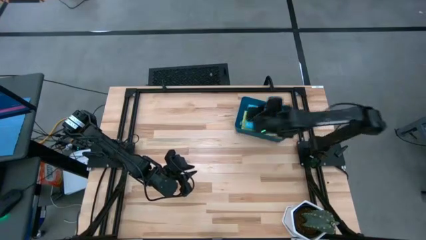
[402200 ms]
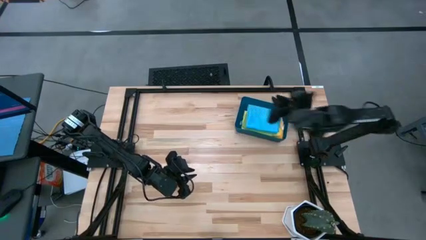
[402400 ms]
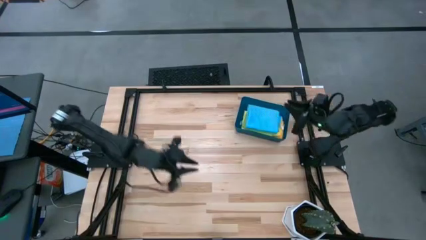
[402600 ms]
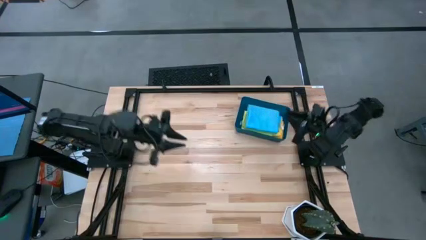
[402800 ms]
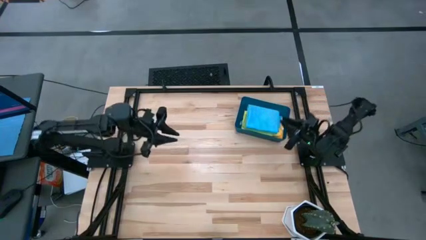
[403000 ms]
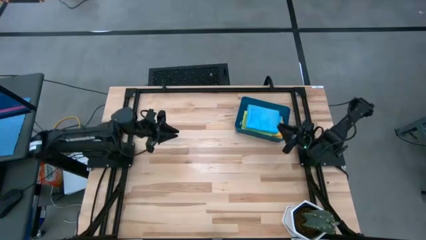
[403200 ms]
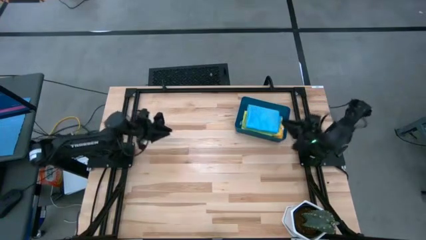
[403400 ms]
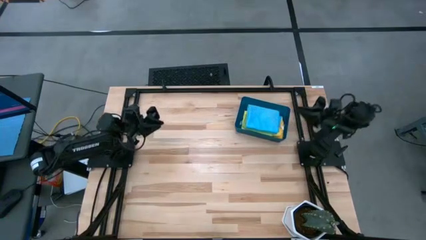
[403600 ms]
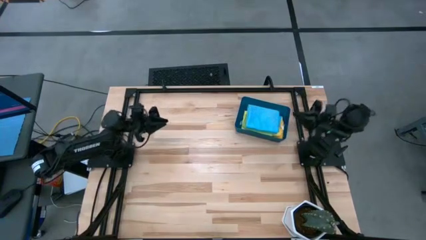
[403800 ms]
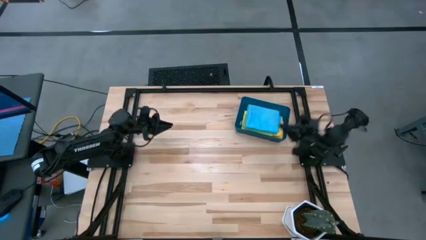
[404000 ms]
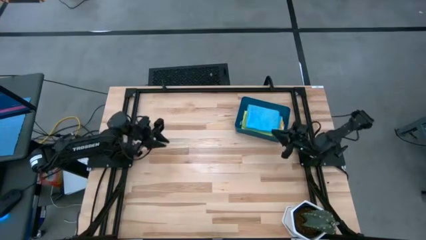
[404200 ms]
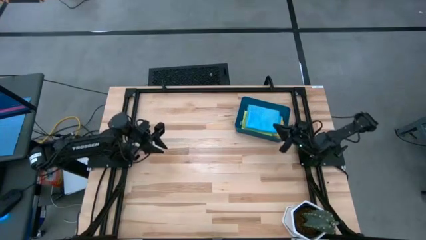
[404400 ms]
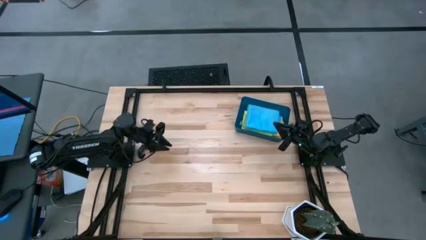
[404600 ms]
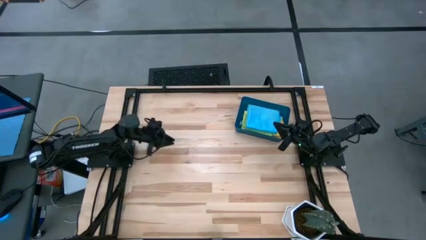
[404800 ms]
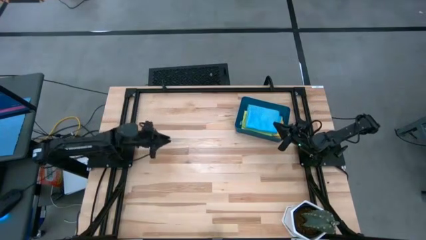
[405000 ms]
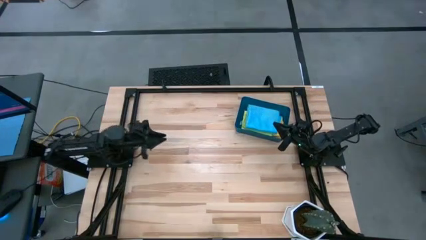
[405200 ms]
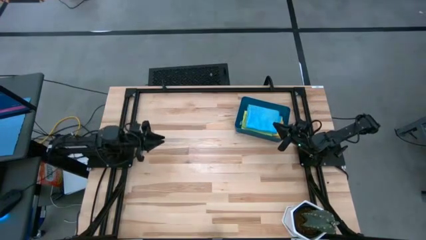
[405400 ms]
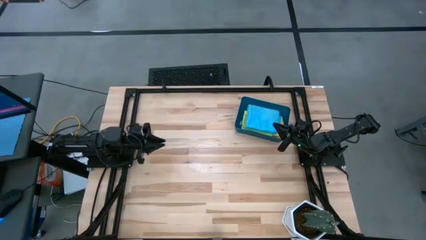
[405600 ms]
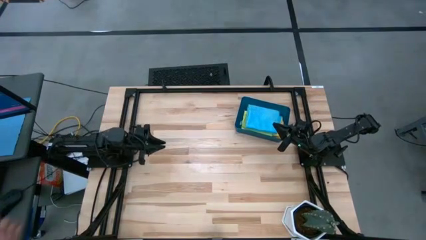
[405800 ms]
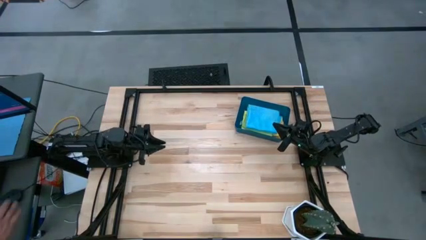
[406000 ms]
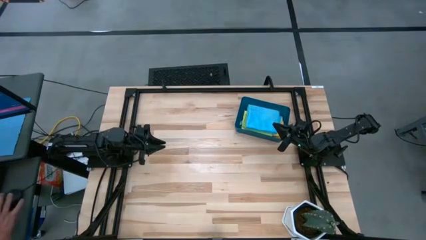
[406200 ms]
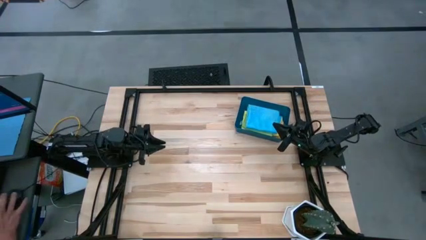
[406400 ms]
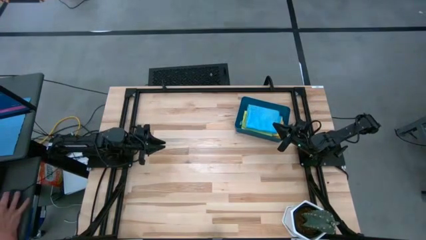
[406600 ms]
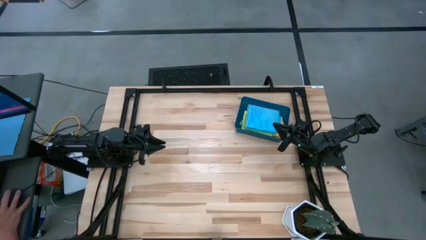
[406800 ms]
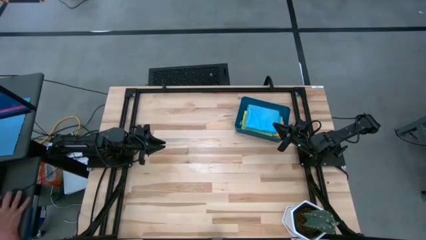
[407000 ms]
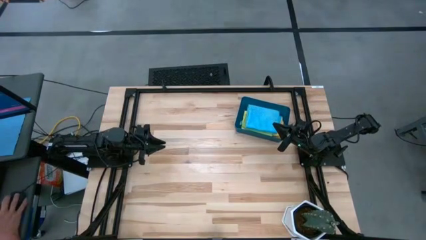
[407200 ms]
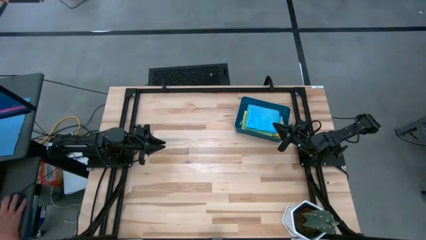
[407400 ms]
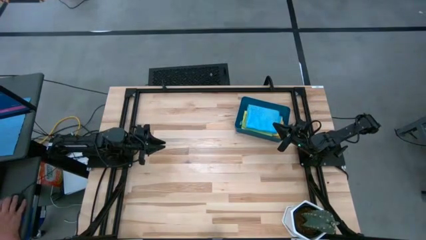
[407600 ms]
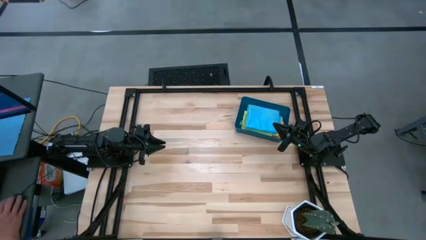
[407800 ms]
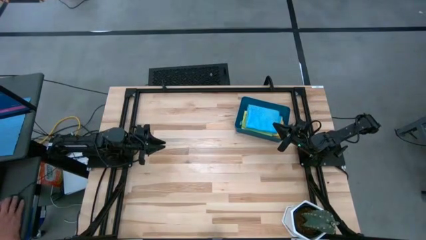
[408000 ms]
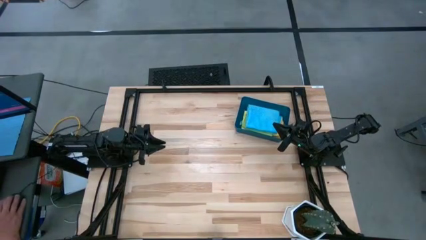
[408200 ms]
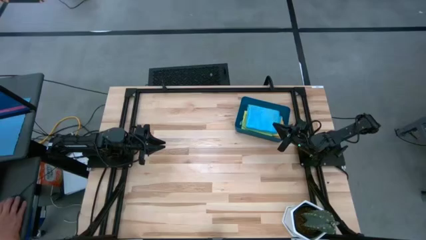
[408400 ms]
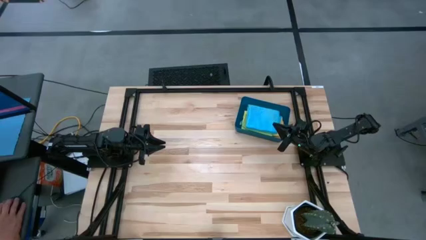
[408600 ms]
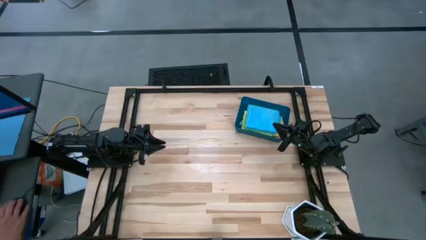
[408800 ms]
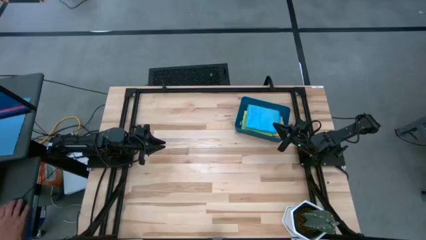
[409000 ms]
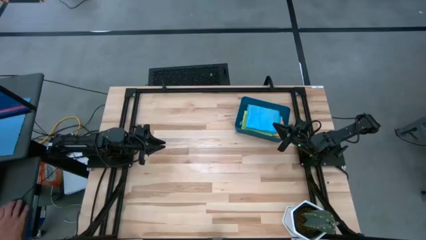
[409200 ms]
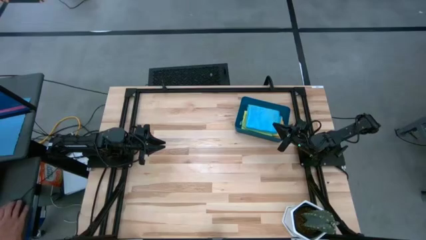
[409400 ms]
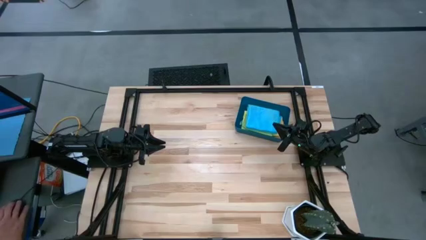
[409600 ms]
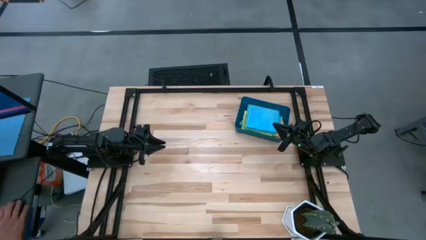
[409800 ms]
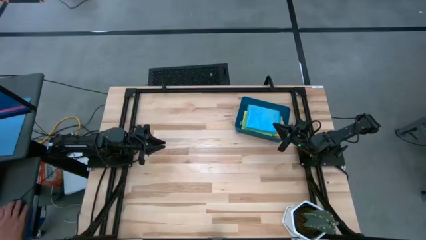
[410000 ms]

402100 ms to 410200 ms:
Task: Fold microfiber towels
Return to Home Position

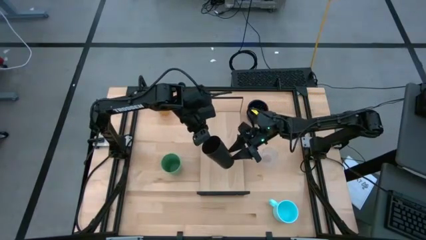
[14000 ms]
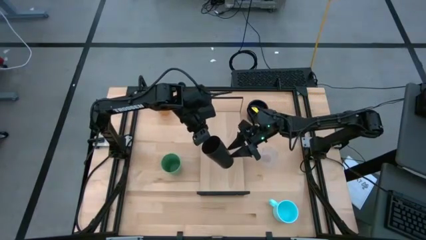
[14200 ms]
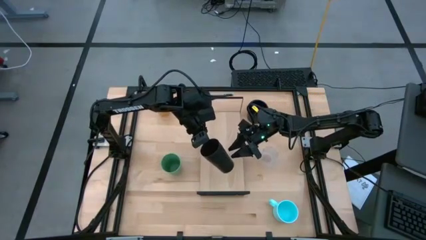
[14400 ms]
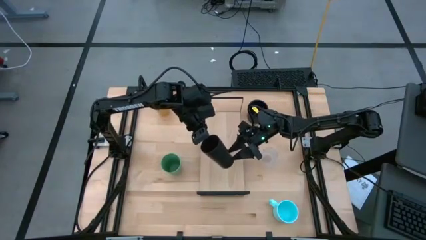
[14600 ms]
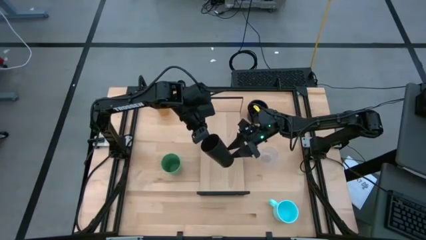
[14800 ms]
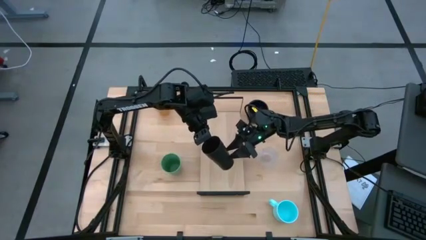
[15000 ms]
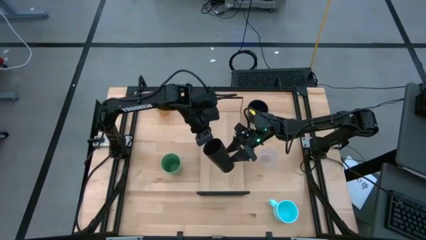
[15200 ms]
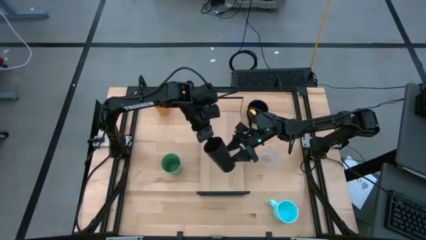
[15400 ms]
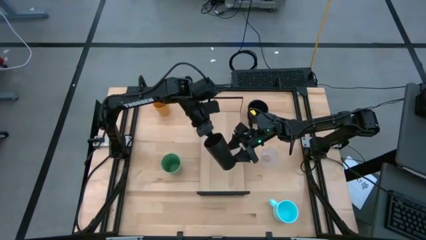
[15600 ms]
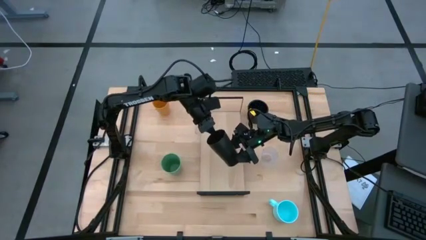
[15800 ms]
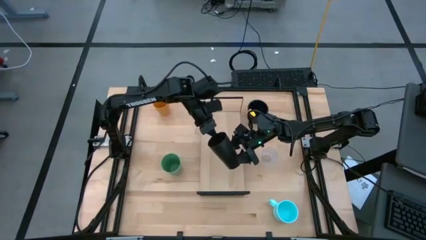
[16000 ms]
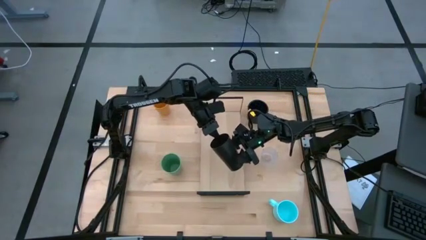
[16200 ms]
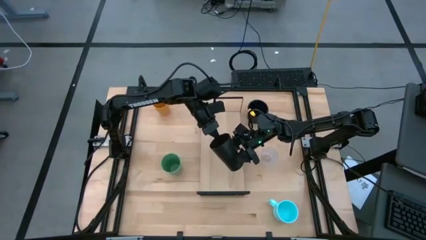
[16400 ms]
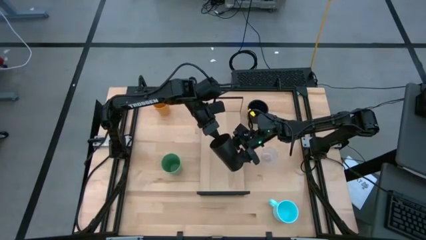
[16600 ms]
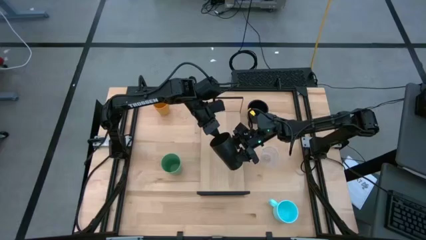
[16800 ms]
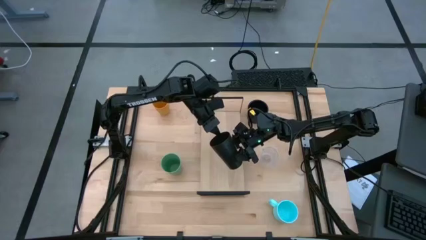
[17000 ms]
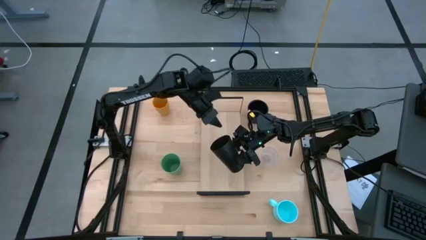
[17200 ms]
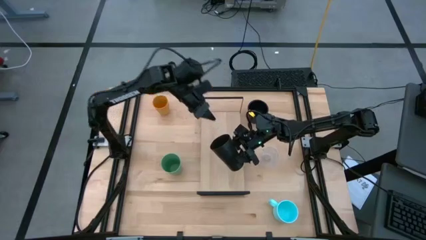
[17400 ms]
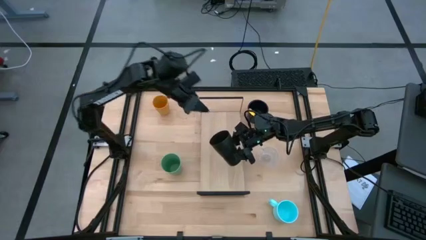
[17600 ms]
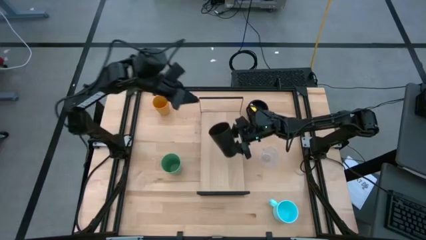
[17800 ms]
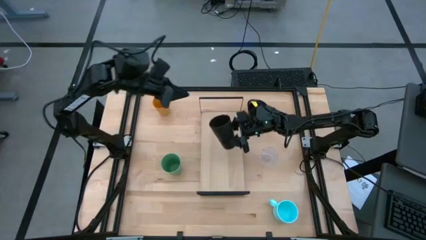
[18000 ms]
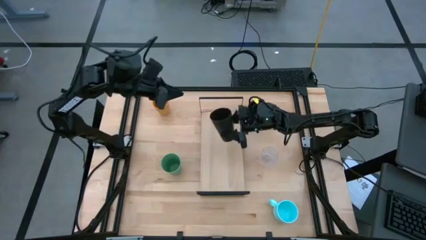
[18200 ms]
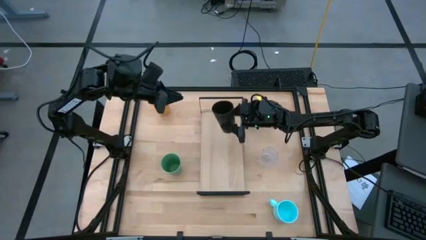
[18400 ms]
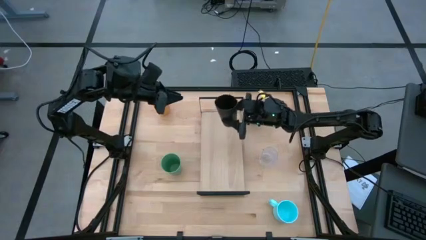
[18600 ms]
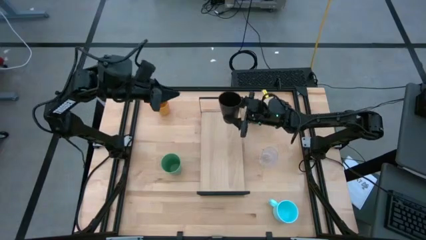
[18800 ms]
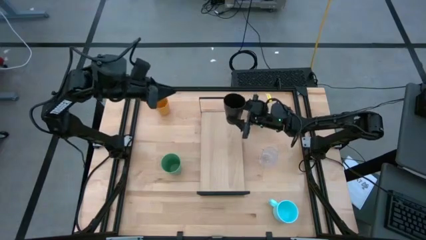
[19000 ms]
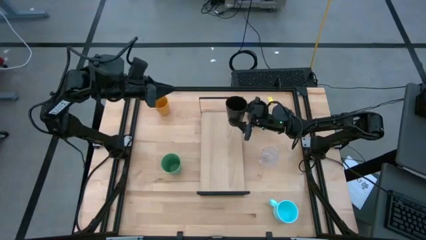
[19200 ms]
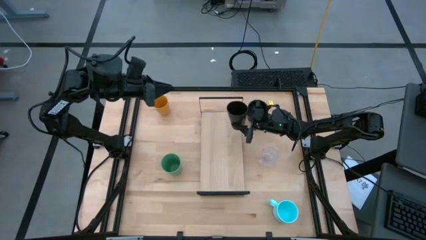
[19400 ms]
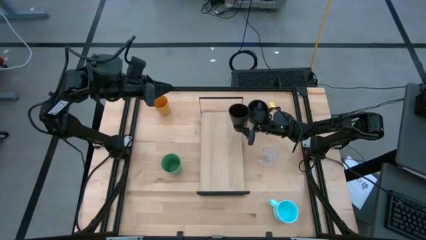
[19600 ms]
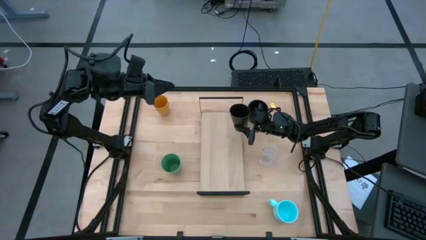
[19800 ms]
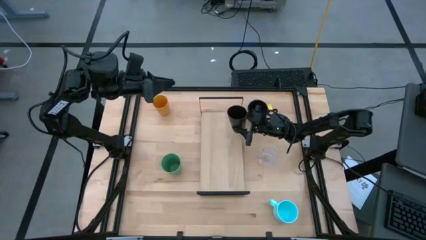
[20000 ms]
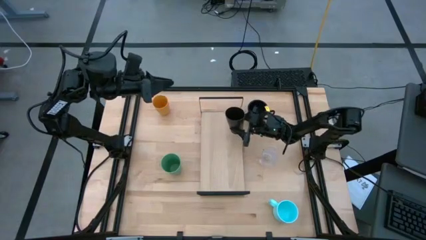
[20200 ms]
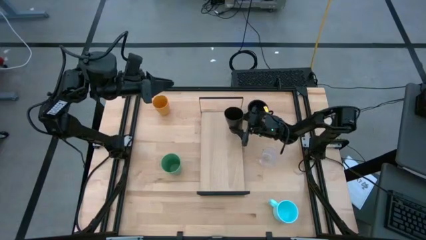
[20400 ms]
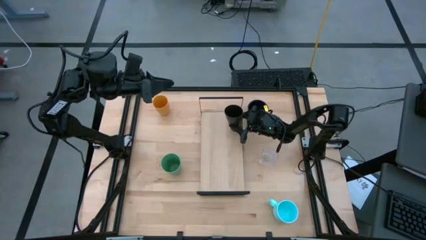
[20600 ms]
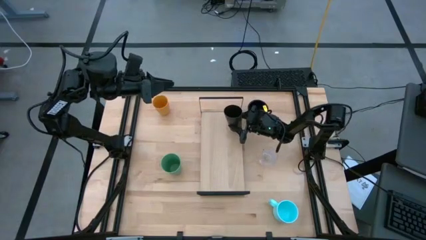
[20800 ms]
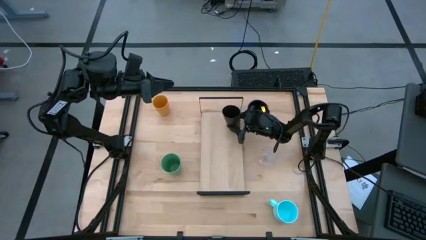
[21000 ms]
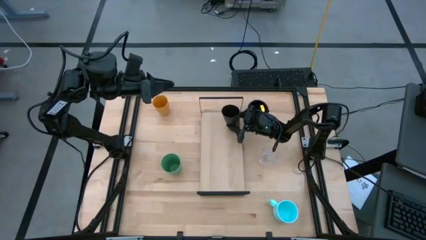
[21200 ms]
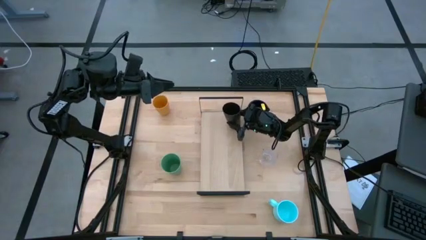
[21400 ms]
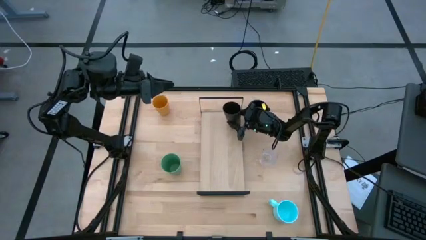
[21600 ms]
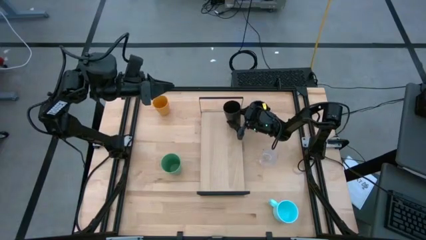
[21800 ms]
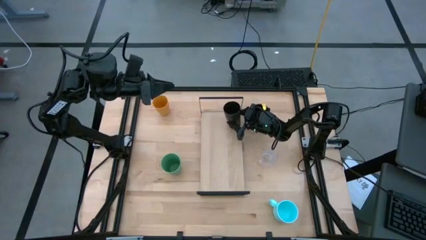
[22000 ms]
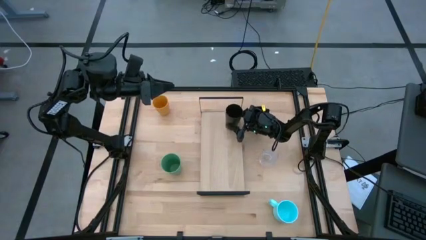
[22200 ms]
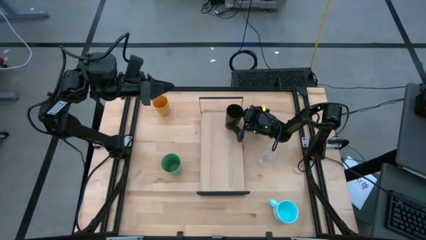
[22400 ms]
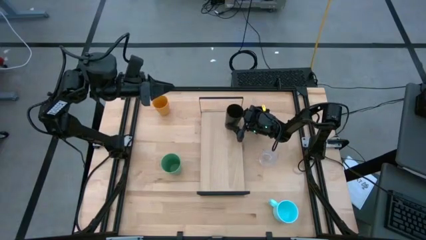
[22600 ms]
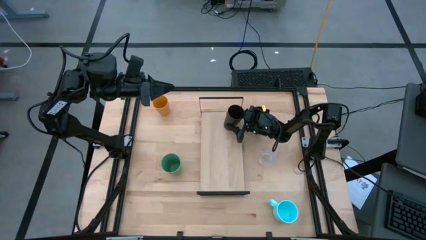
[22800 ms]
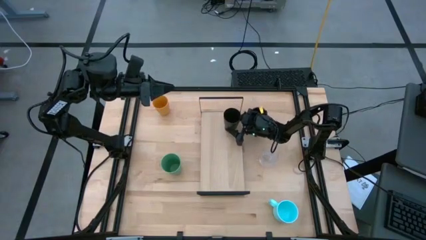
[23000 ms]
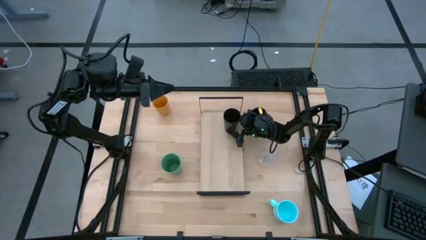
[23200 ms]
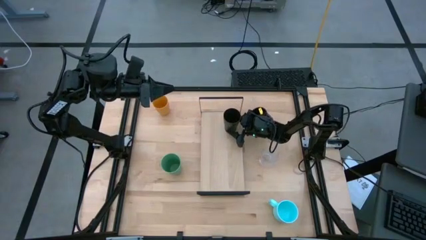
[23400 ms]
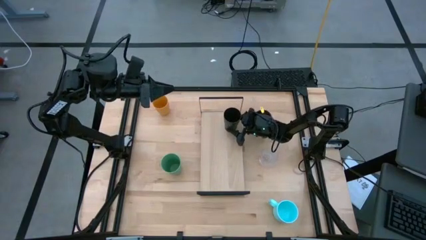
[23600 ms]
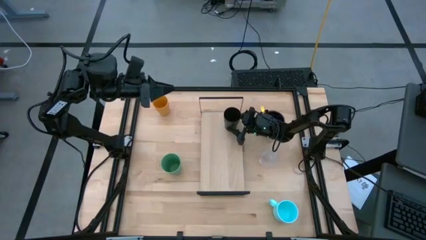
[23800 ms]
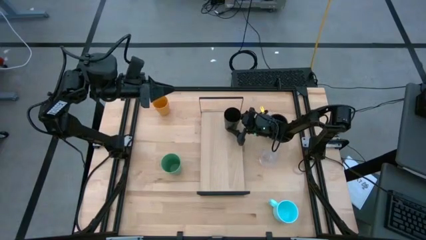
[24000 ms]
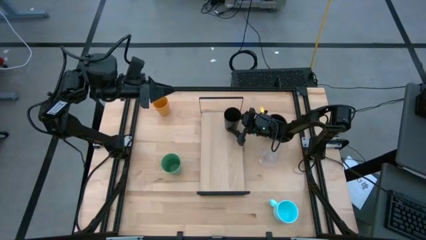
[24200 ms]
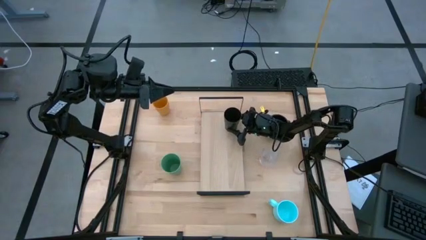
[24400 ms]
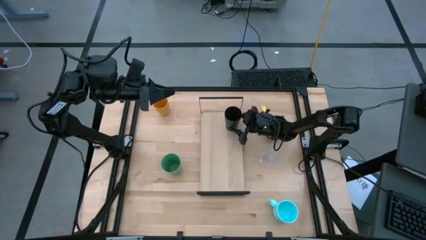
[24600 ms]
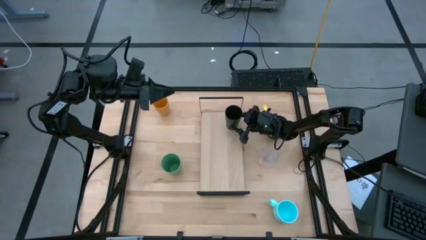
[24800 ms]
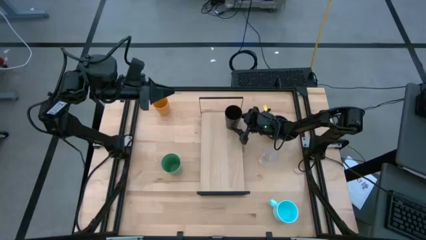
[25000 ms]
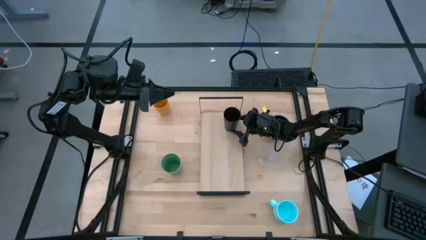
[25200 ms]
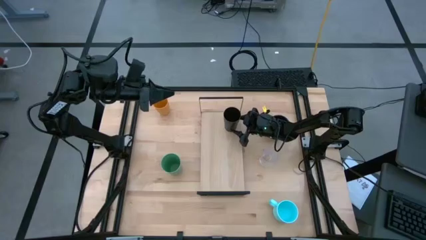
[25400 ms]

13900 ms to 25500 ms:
Task: Stack small to large cups/mugs on shelf
Put the black cup on the shelf
